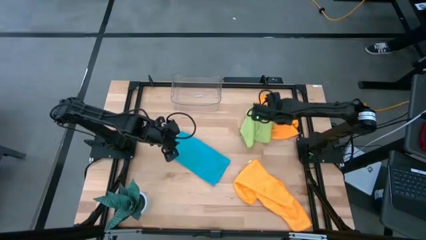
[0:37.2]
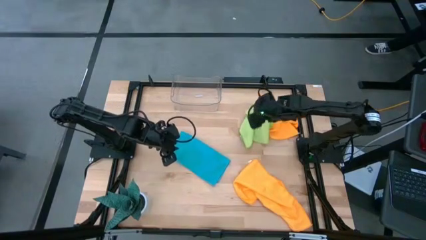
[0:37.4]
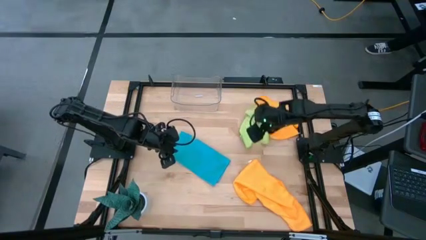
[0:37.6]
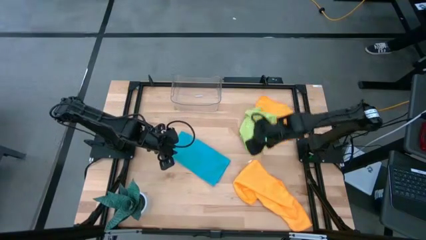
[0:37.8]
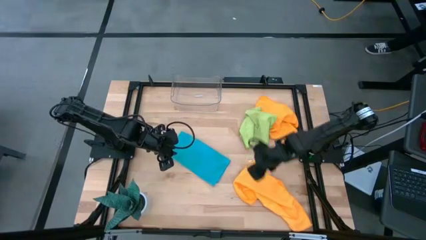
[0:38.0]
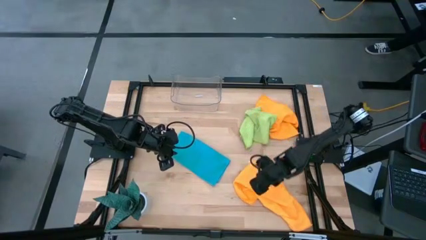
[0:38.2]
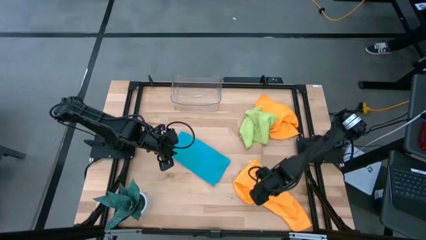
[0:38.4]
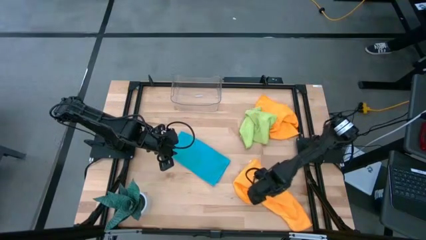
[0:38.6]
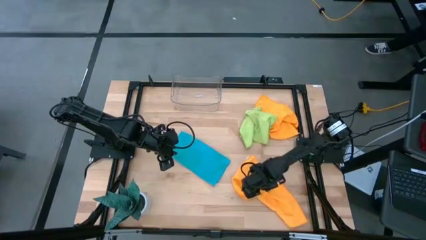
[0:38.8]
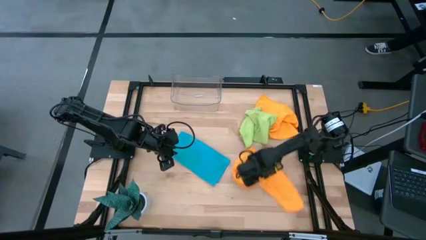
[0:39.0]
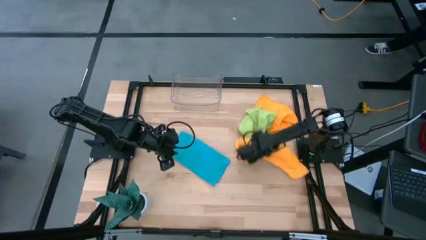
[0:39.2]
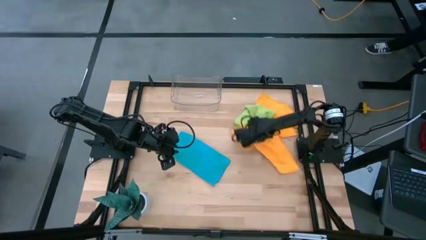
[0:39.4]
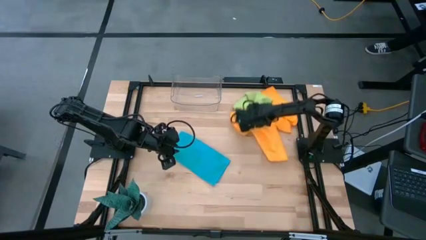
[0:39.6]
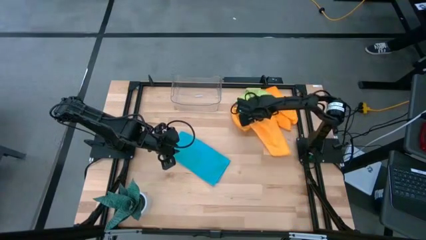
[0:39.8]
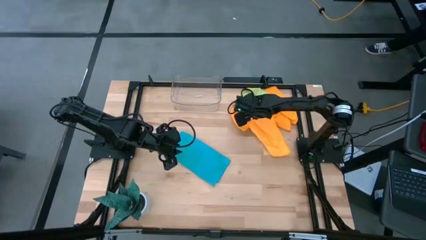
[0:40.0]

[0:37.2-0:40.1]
Task: Fold microfiber towels
Move the orange microfiber cloth to the top right of the table

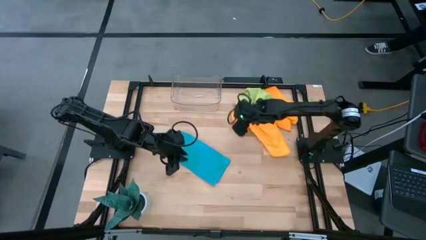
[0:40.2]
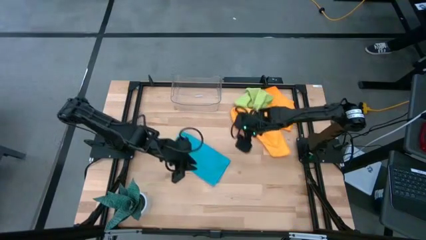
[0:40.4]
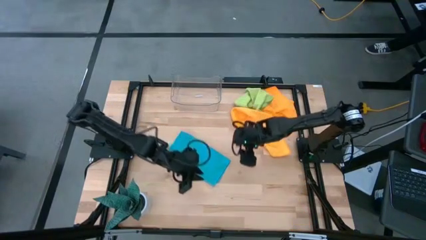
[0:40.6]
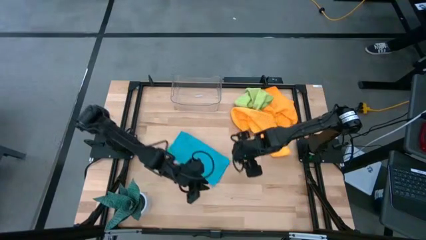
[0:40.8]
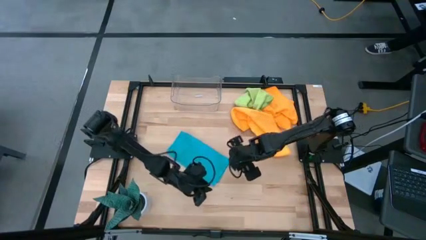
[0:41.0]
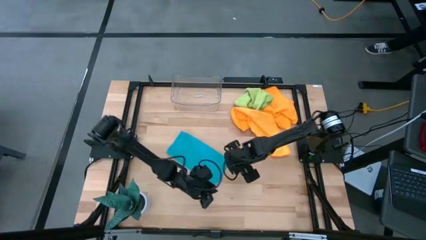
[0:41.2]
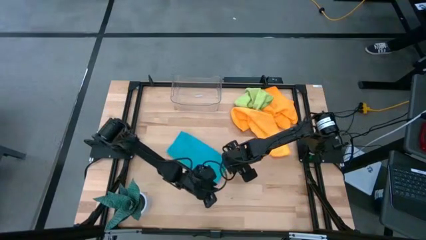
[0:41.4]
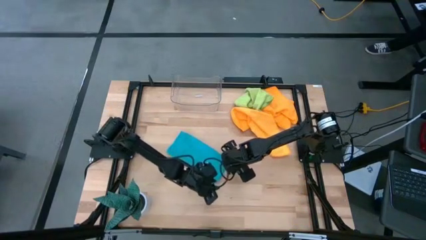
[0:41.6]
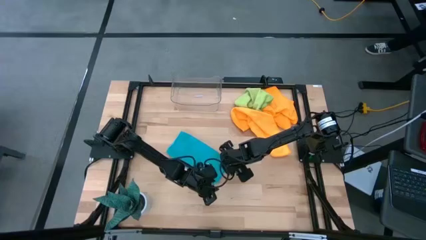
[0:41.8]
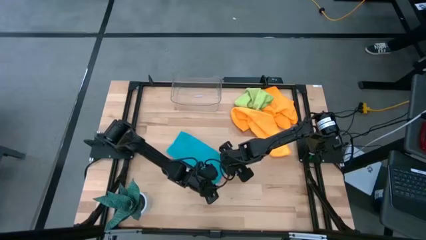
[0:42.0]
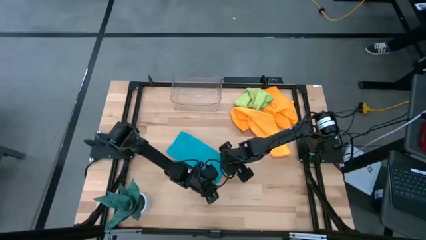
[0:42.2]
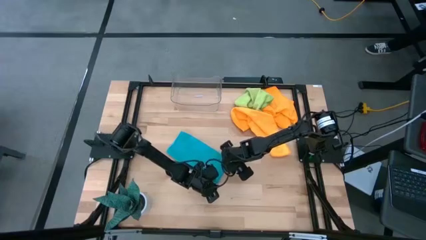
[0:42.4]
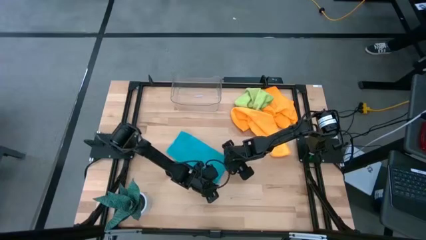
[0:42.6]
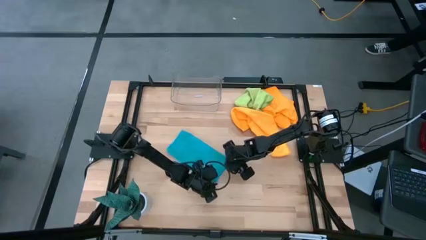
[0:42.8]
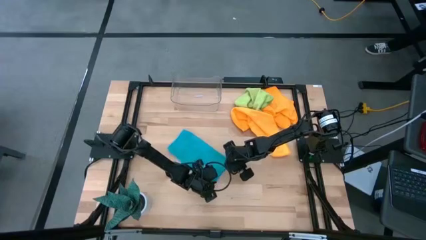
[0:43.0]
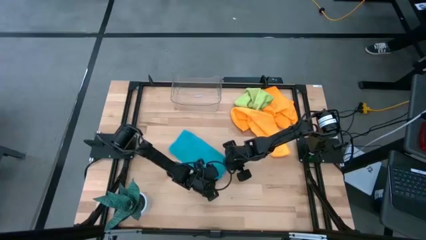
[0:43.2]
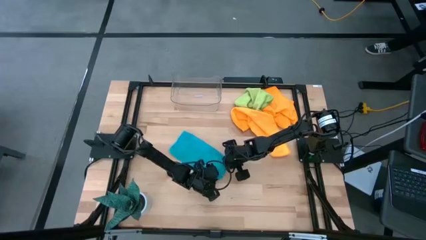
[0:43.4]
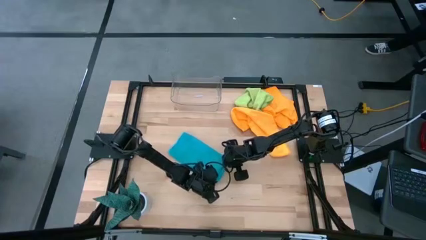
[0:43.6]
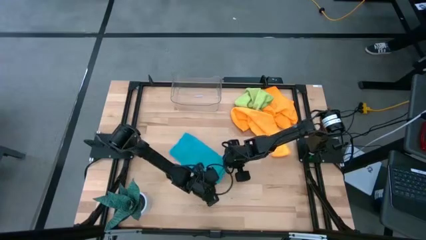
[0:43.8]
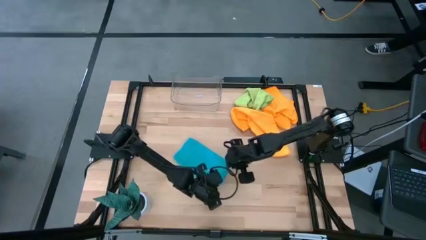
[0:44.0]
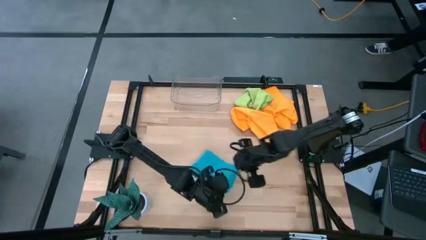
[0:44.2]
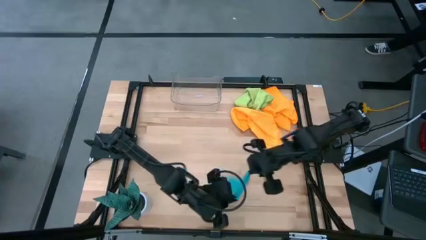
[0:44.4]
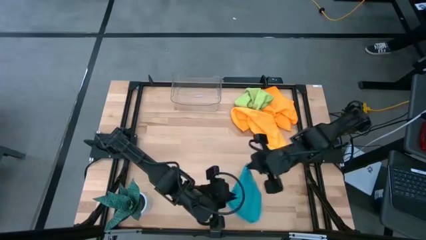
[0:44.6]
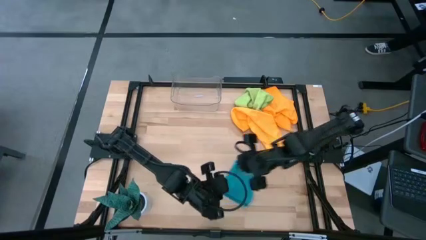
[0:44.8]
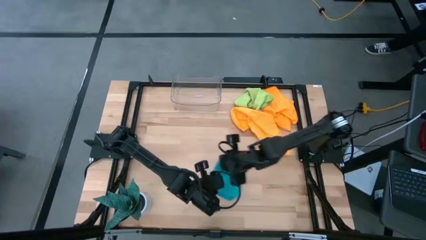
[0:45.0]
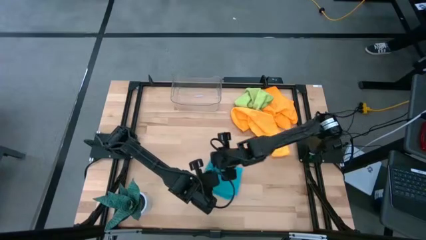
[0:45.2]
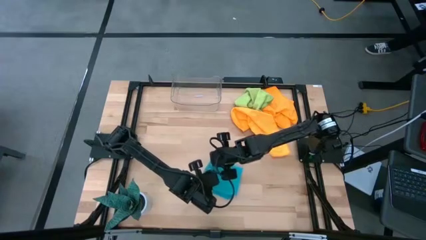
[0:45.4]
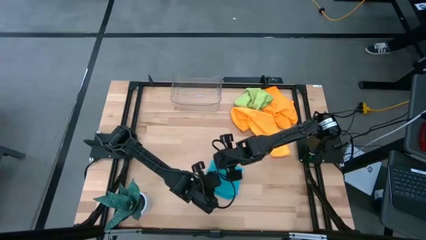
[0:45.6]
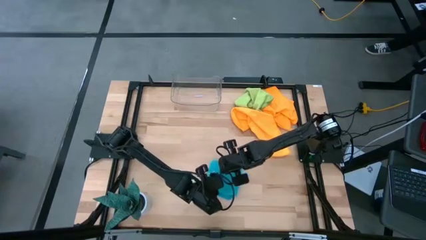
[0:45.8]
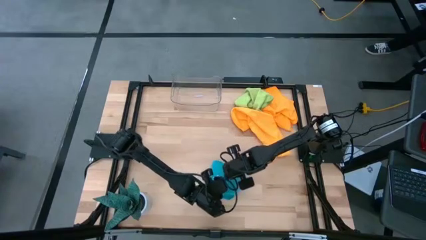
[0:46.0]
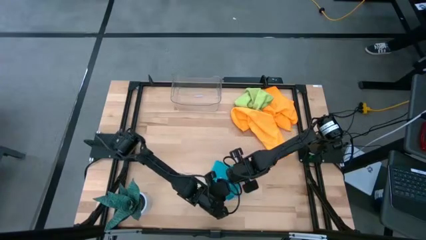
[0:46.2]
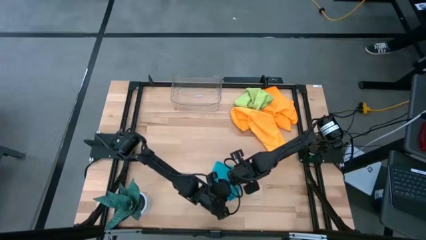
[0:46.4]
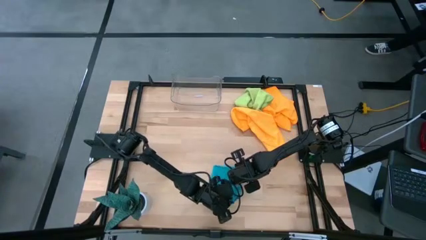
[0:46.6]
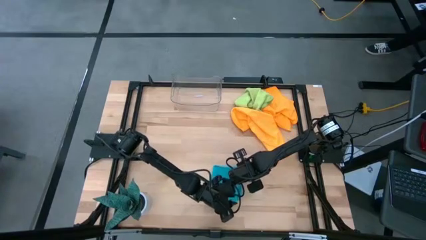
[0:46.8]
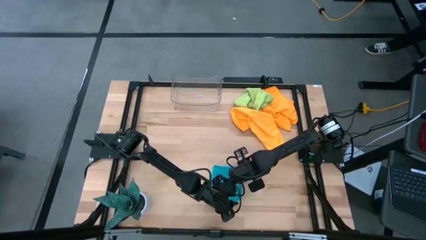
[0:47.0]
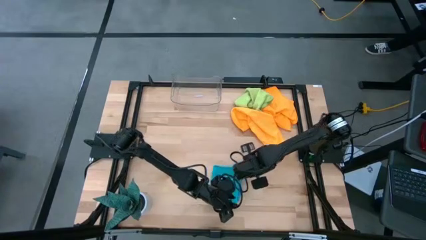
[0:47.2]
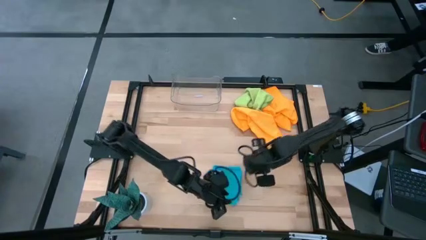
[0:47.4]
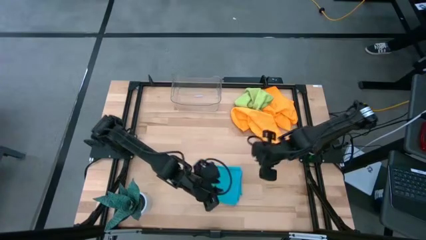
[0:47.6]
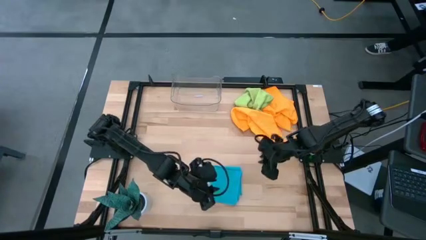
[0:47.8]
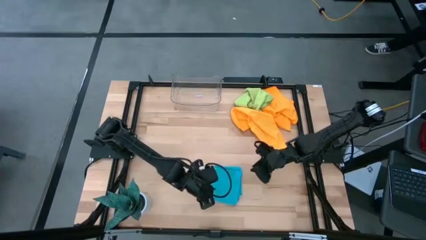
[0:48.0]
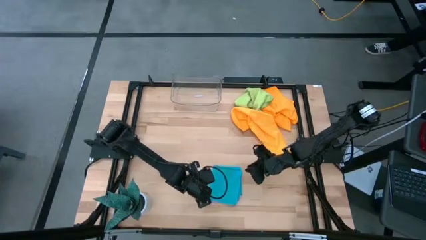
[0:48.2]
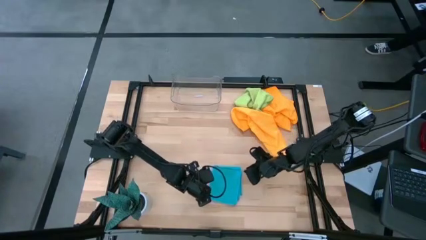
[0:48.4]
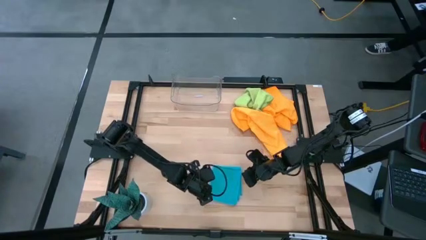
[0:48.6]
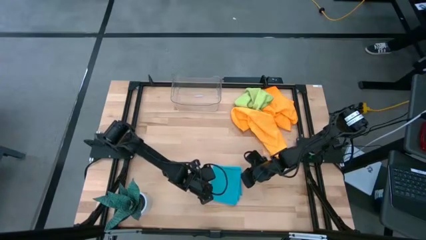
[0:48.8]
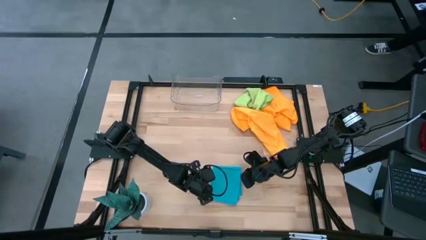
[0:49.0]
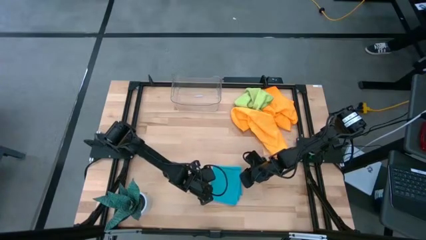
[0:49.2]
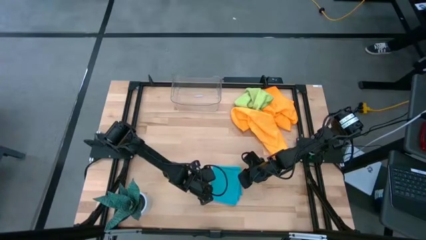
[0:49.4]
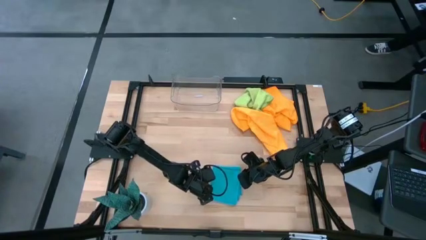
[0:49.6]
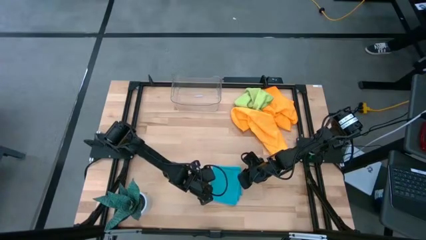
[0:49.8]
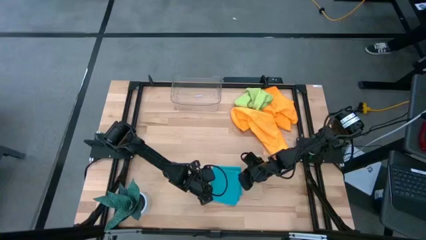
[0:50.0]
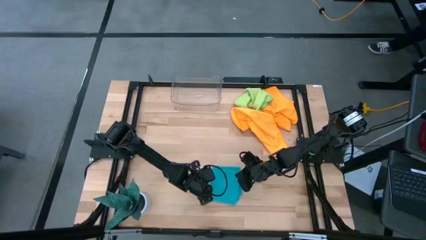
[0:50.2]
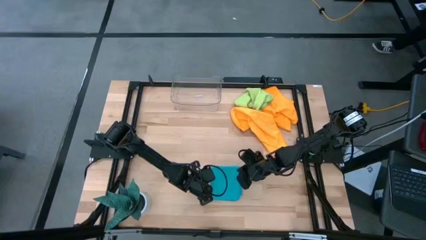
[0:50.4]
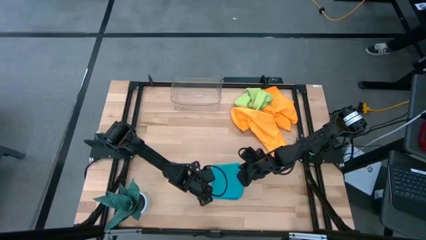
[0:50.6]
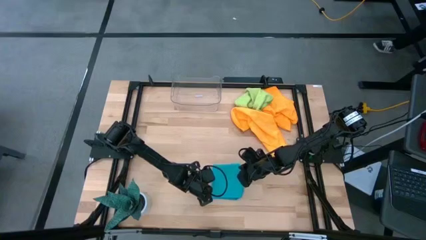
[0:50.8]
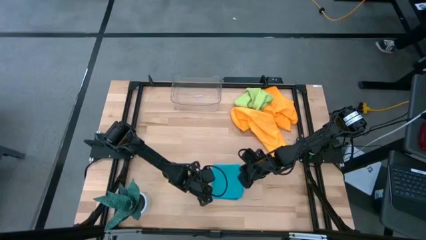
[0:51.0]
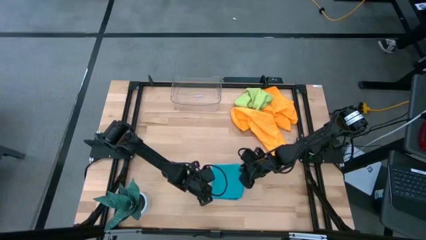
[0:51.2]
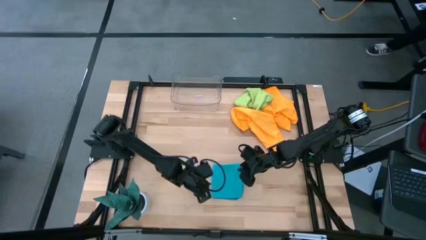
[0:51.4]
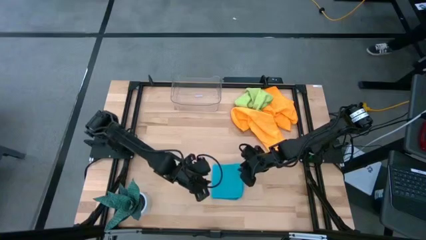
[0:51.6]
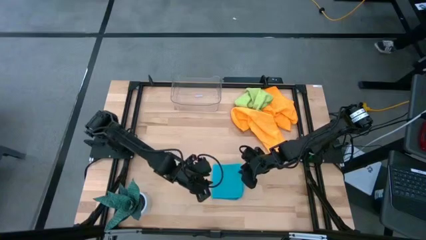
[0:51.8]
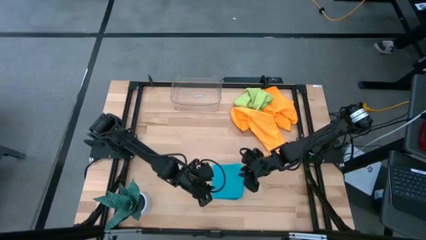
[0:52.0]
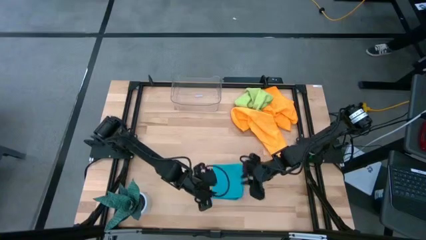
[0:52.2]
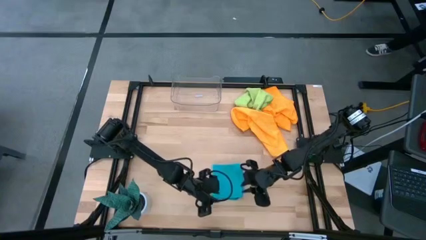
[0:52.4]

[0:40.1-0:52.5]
Fold the blue microfiber cloth

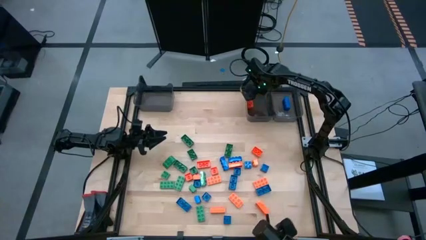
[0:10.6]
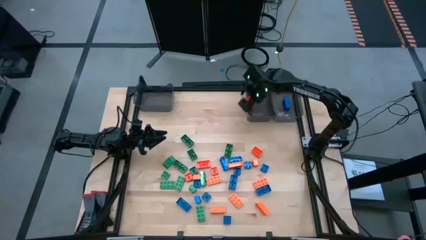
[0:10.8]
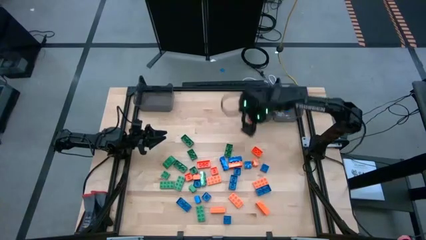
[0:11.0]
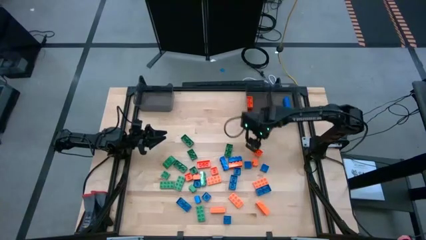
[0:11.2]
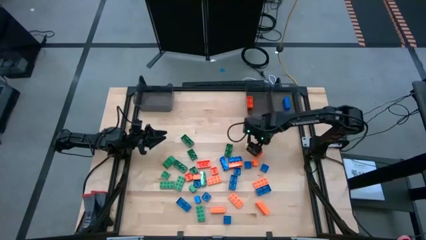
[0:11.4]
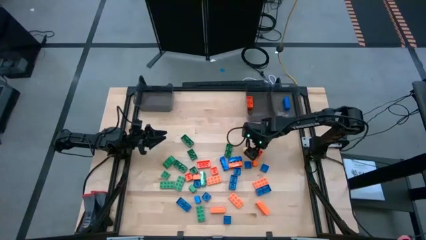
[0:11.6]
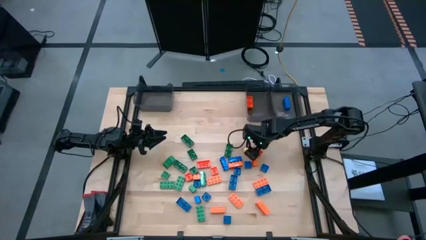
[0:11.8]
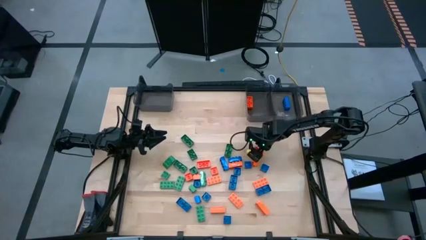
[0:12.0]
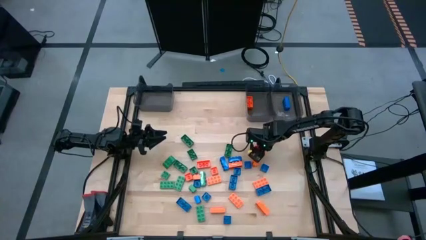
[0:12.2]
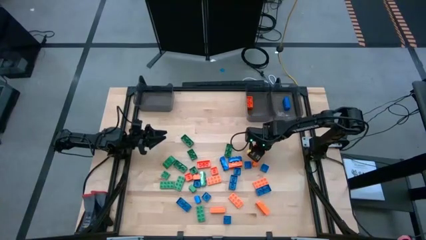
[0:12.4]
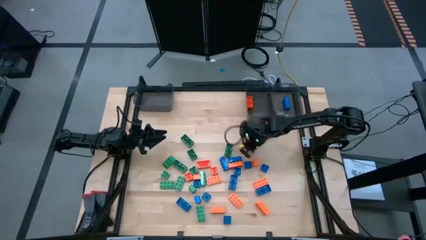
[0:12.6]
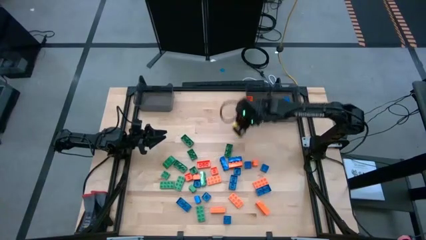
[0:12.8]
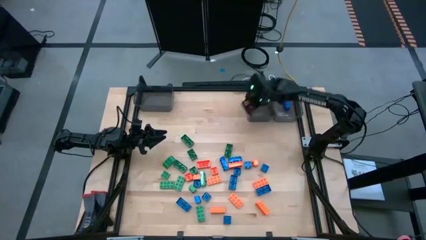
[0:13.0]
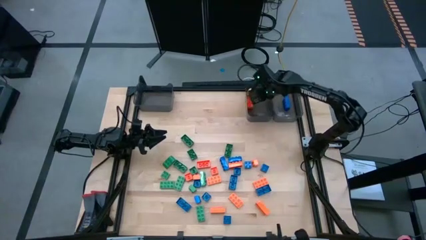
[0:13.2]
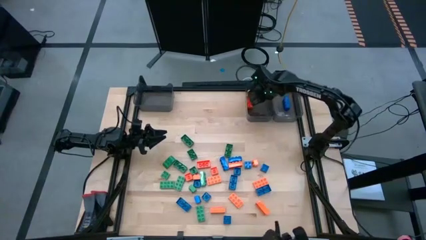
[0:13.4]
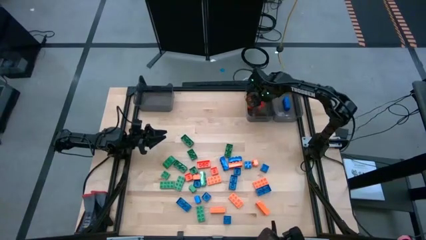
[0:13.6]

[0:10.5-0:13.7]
Task: Sort blocks
Put the orange game piece into the middle black bin
